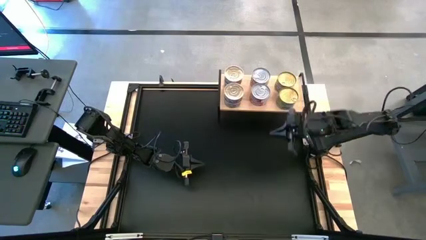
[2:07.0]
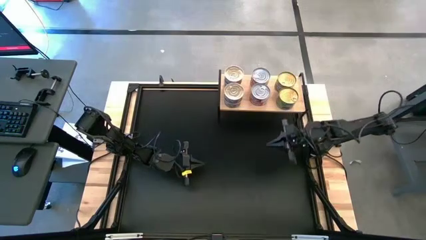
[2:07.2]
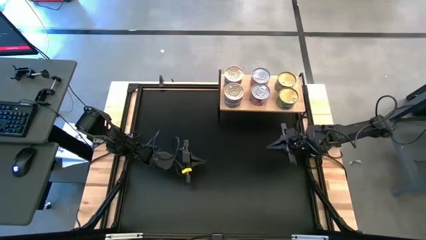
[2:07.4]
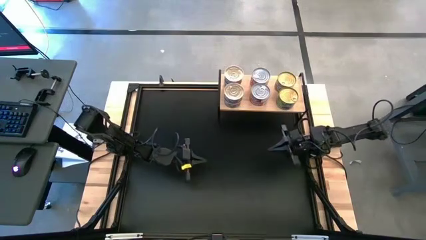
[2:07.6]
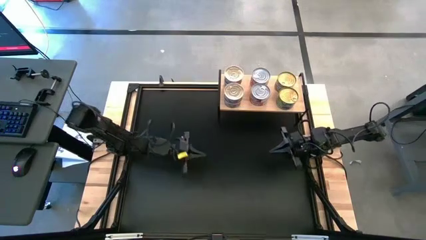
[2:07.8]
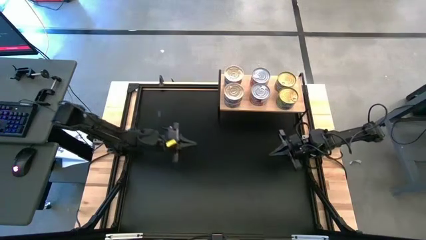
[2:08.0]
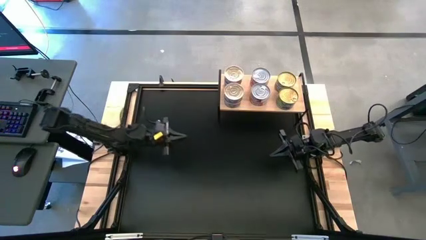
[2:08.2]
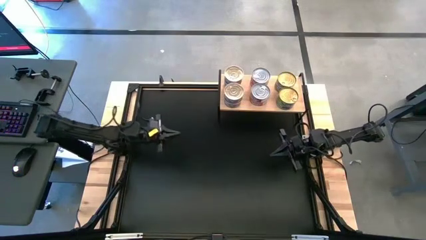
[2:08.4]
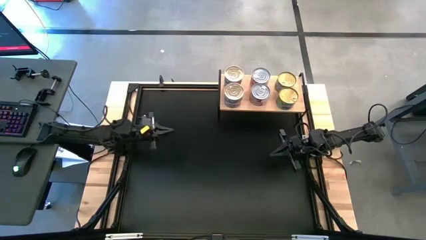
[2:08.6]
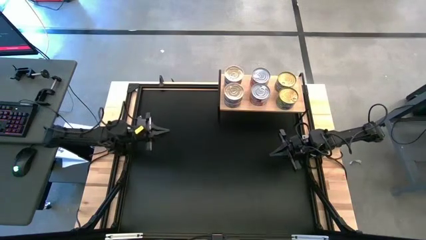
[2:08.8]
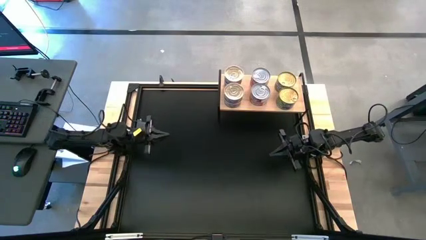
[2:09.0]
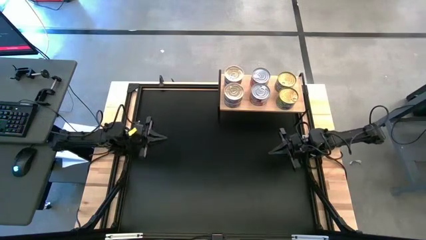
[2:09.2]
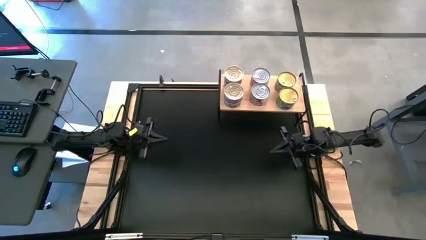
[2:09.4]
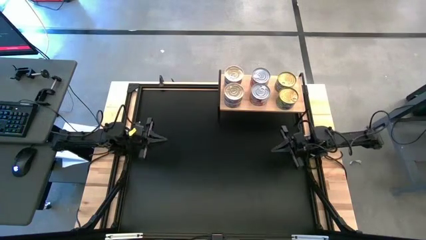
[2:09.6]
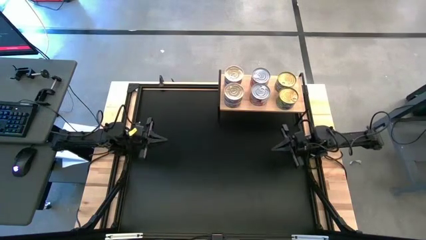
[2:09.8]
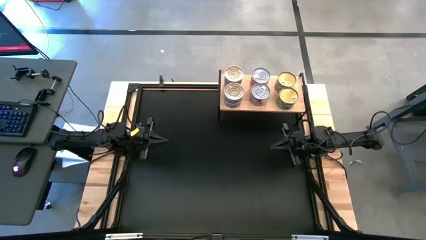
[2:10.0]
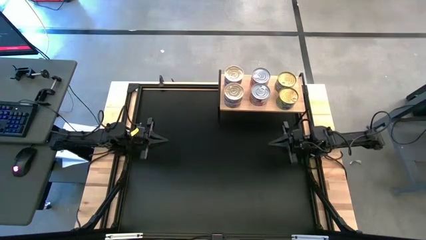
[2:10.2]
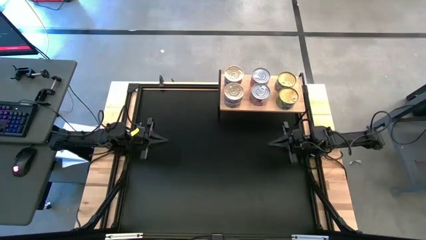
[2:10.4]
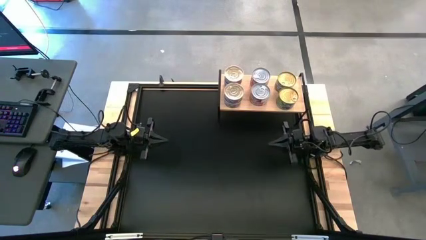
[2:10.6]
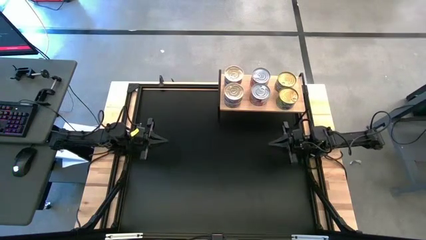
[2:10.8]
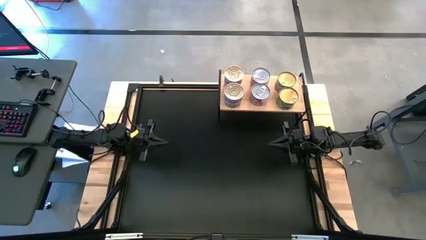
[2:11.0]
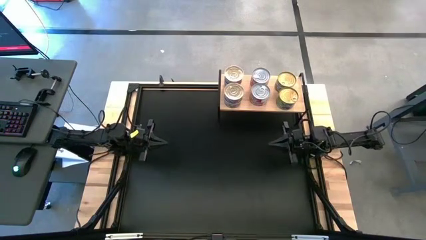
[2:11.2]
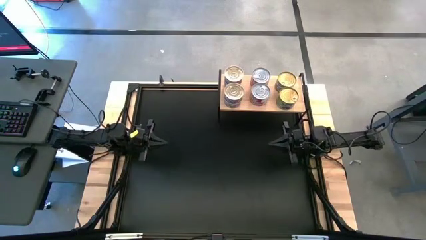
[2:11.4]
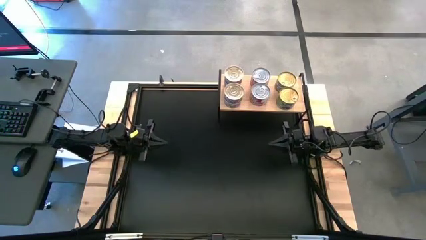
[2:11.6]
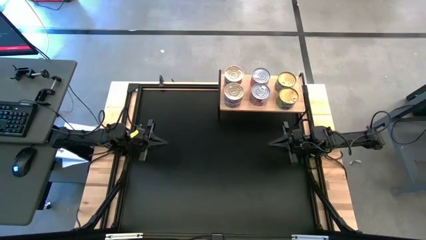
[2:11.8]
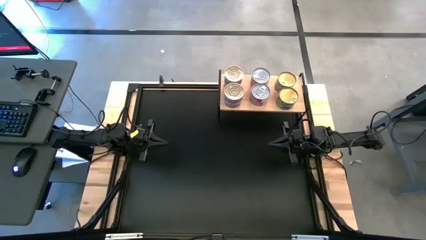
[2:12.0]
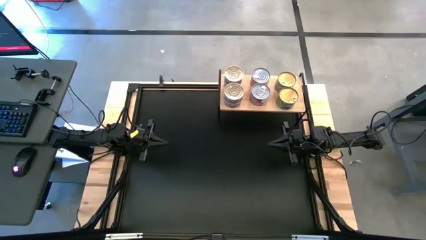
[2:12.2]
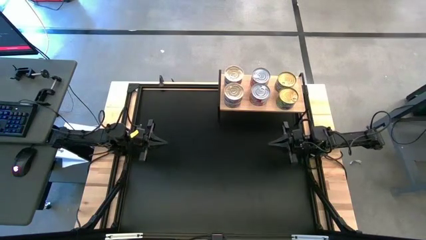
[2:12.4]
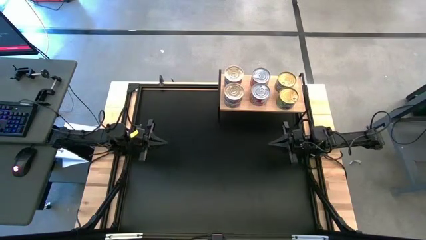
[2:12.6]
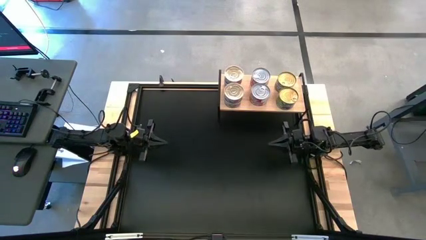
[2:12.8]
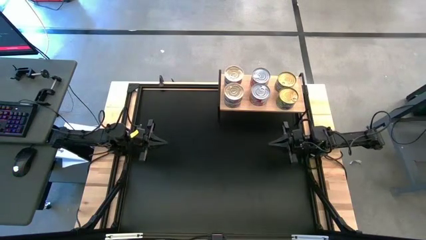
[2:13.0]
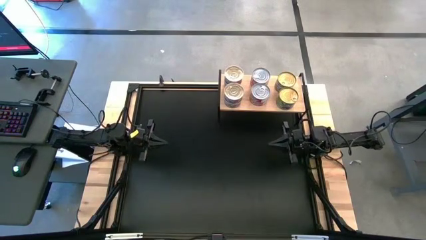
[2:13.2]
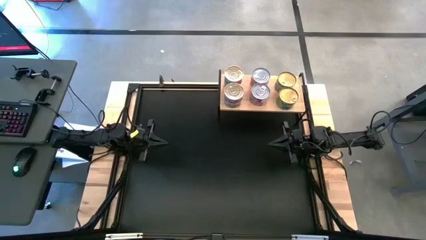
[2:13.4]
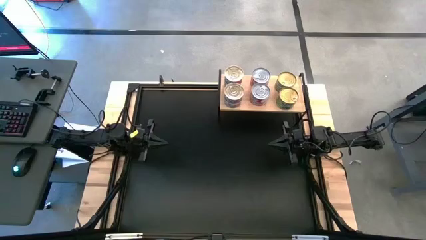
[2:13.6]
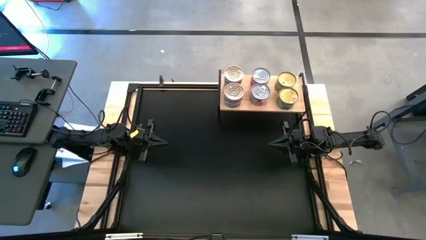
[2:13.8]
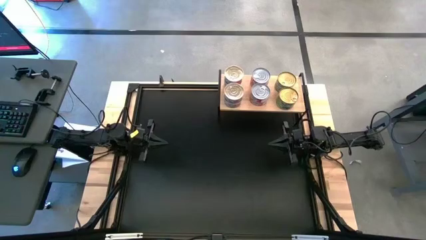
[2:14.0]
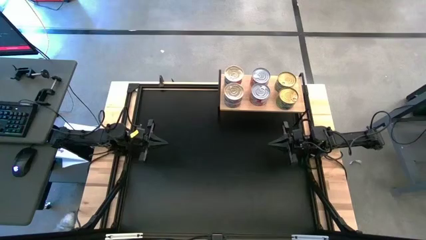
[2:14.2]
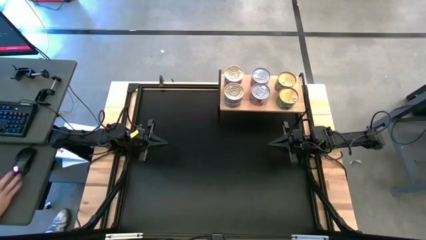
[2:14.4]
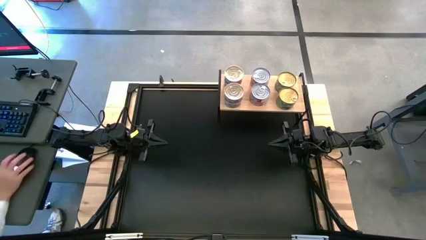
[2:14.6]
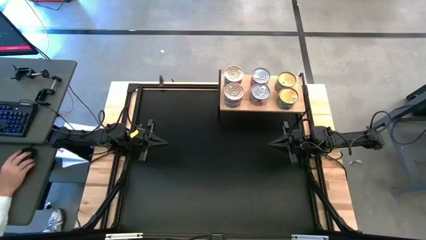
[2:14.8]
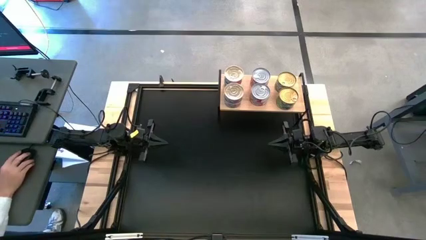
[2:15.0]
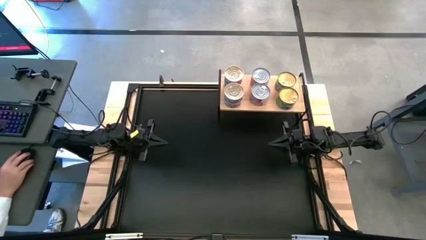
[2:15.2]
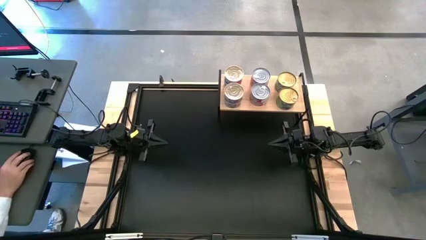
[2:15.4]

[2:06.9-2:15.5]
Task: Stack canned seafood by type on shelf
Return to Home Position

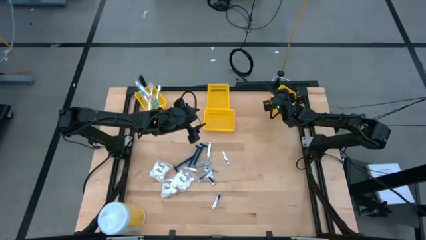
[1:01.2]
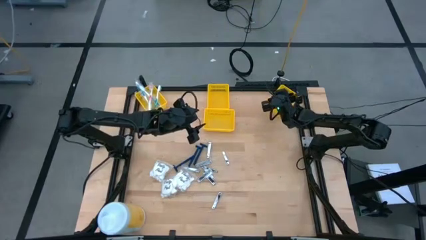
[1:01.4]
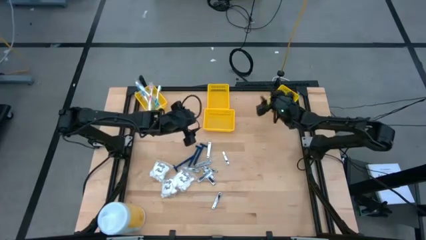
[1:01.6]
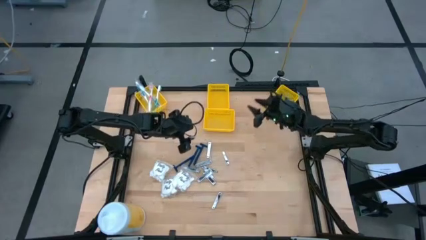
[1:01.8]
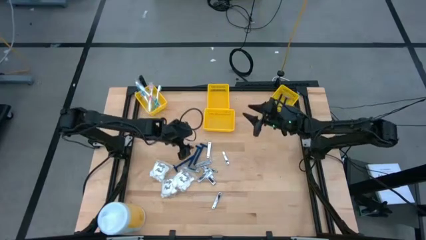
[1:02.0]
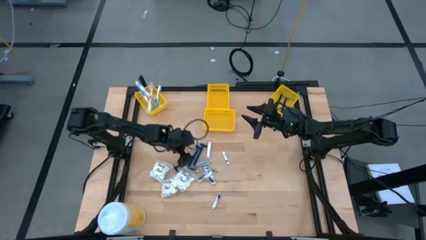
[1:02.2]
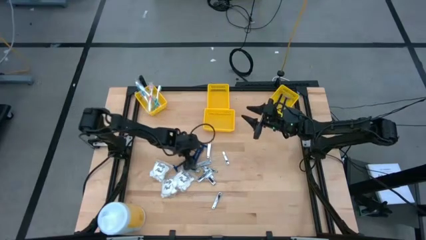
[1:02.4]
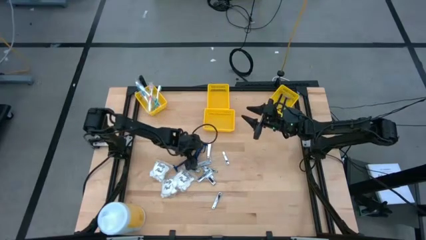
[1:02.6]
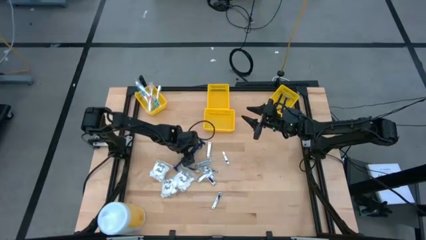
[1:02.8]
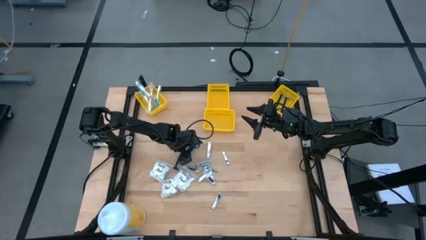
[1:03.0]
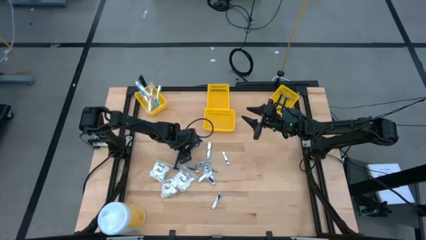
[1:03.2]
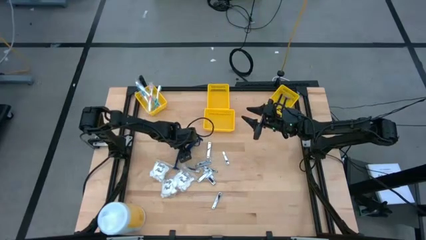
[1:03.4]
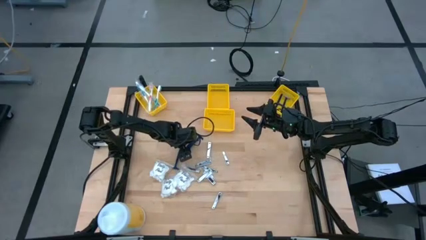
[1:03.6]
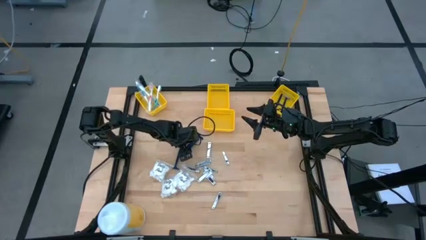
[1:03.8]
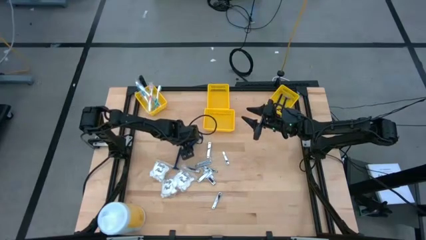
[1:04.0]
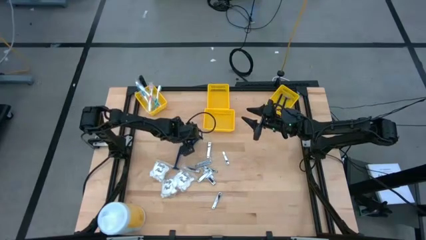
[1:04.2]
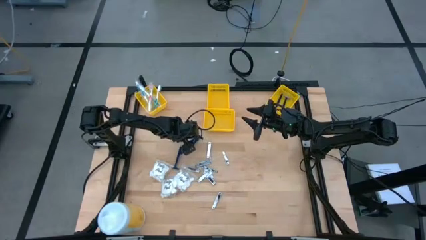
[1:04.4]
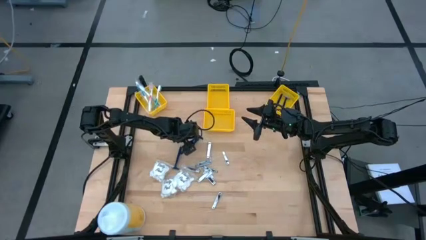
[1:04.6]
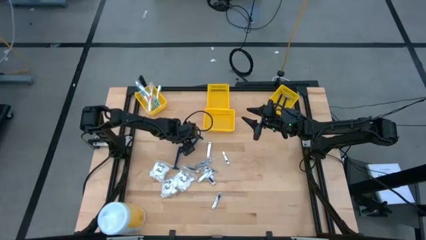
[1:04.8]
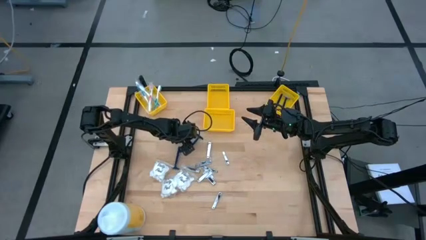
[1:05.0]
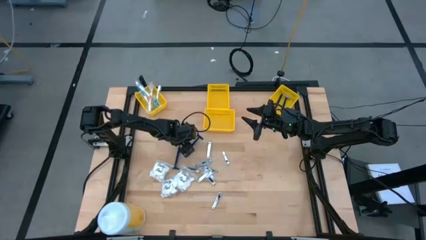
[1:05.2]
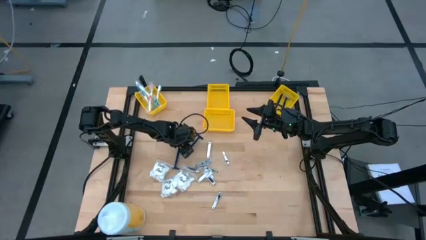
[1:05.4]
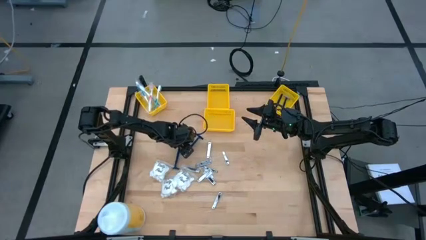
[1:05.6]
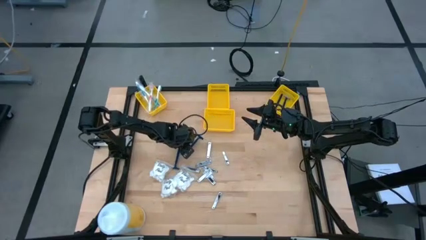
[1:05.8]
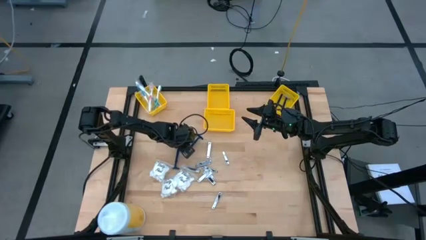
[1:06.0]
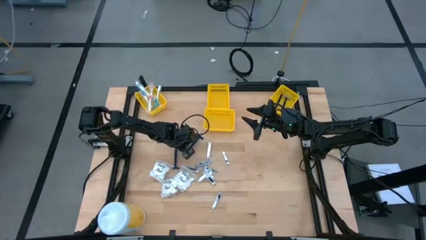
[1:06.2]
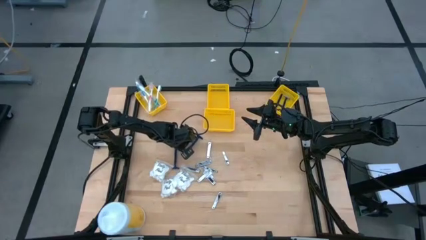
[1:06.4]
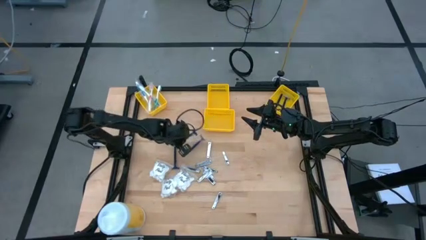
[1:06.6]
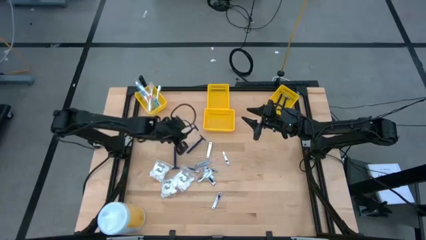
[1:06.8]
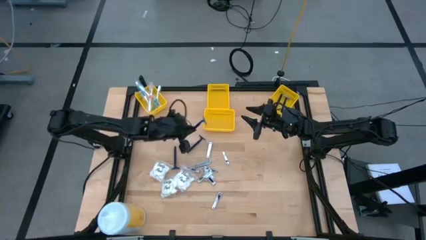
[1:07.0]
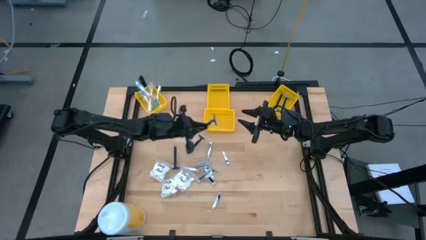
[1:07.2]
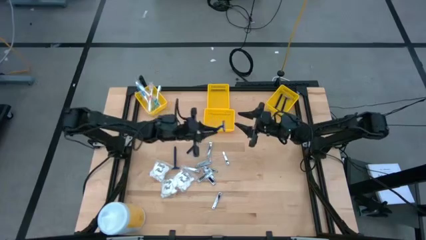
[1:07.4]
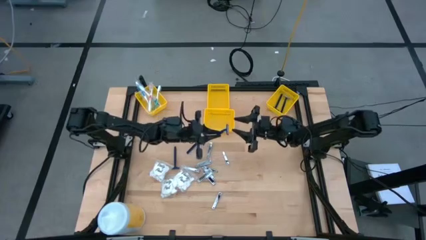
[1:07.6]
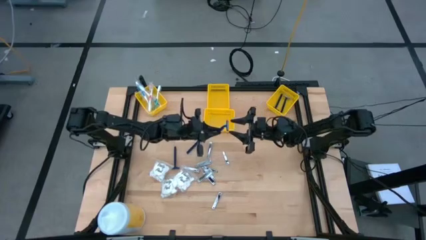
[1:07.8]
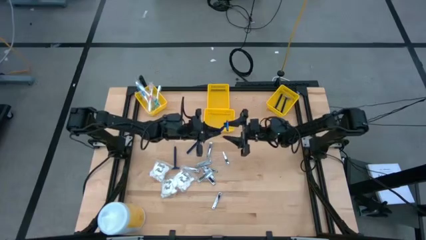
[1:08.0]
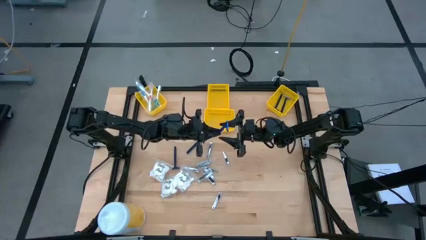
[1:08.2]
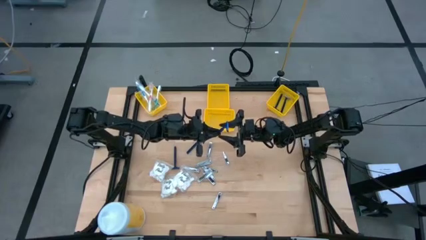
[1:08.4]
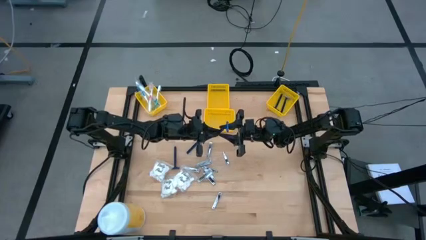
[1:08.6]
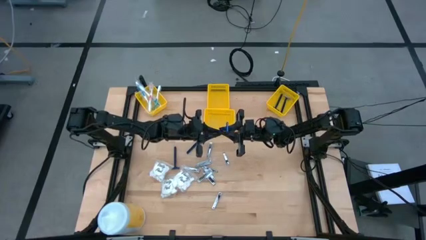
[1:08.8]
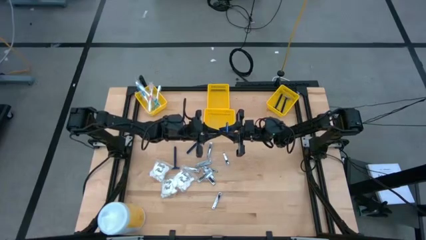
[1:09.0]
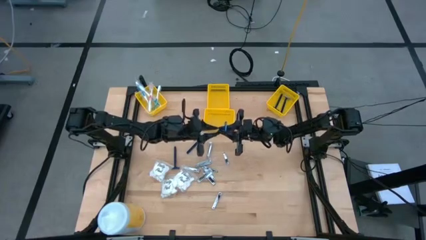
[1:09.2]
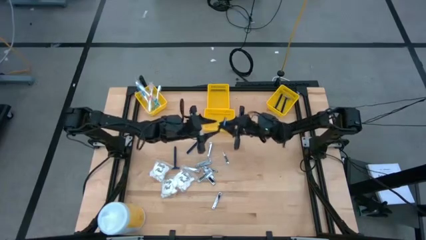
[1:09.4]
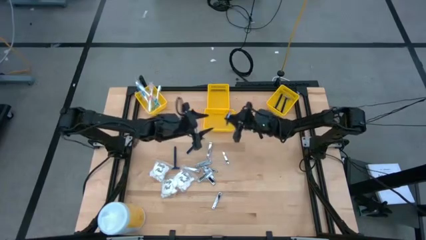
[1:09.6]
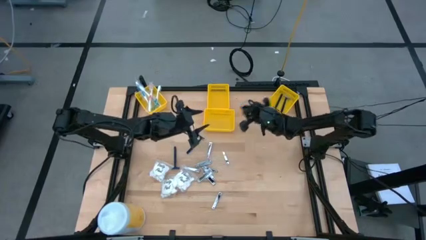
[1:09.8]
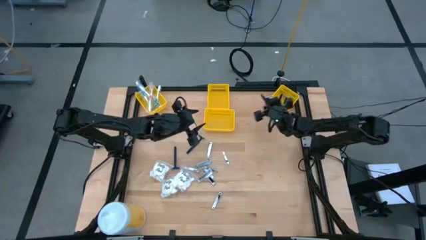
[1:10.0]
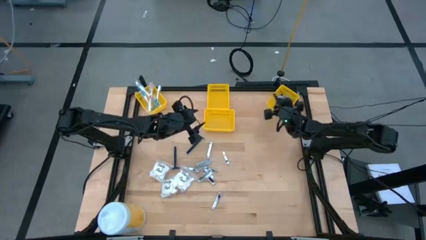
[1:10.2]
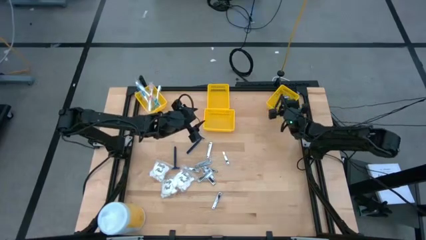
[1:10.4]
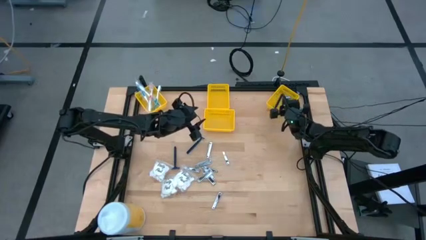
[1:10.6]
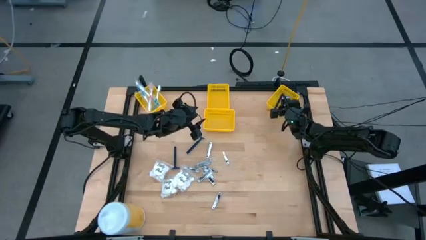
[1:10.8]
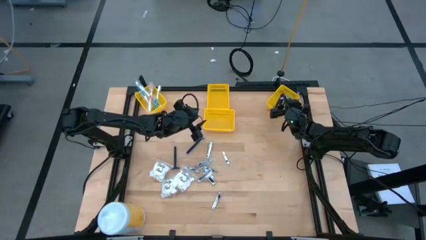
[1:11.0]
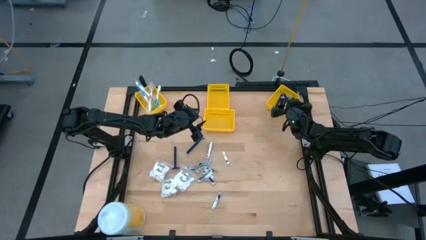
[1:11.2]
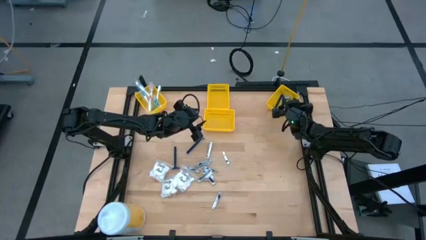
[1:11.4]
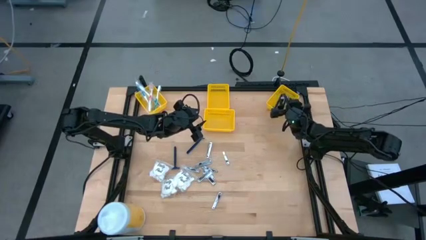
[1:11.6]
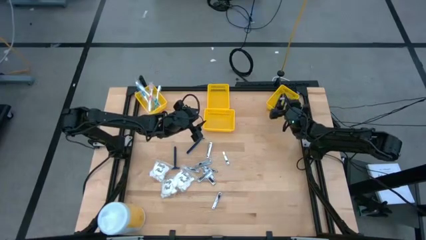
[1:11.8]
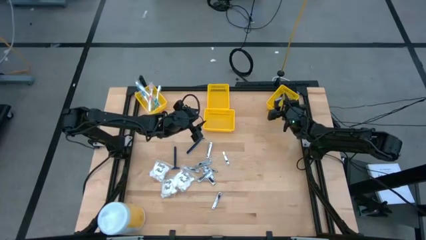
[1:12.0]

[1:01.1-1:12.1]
Task: Pick & Place Travel size toiletries
Put the blue razor into the right yellow bin
